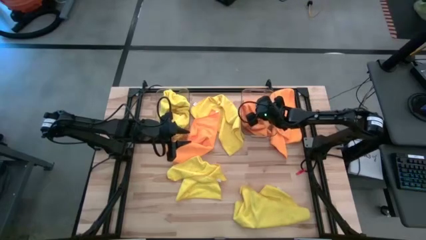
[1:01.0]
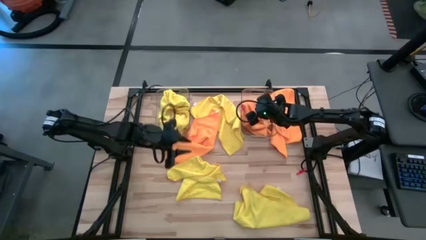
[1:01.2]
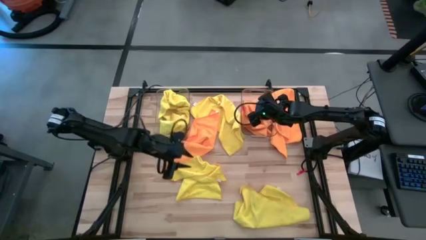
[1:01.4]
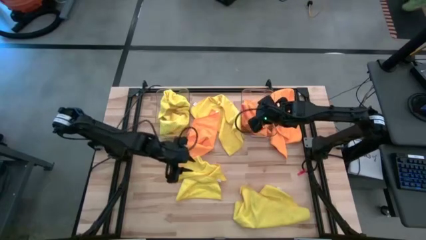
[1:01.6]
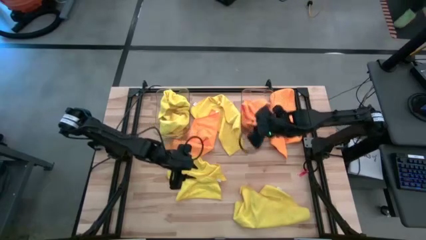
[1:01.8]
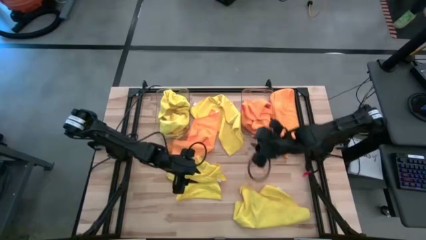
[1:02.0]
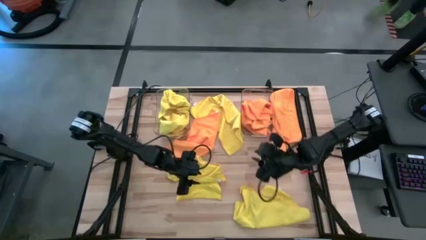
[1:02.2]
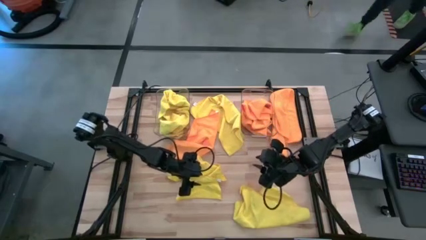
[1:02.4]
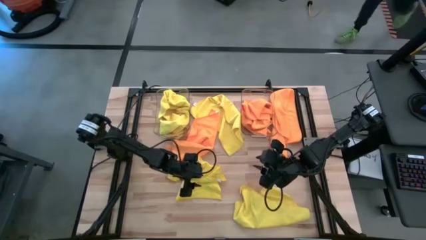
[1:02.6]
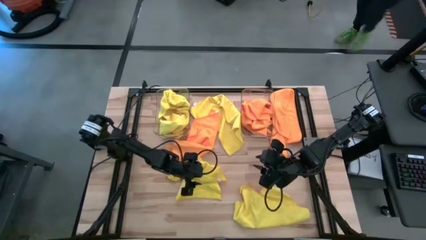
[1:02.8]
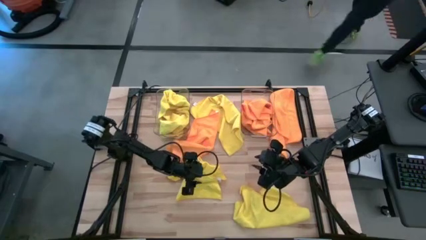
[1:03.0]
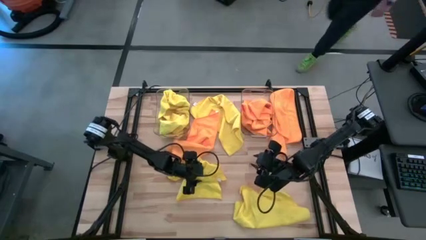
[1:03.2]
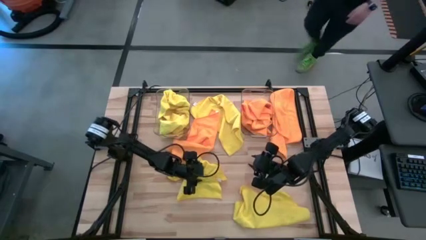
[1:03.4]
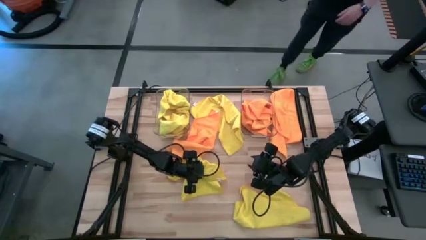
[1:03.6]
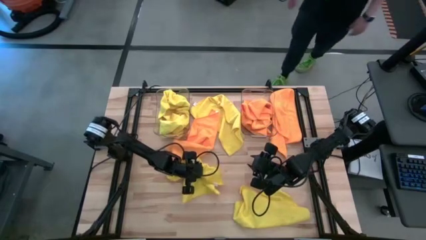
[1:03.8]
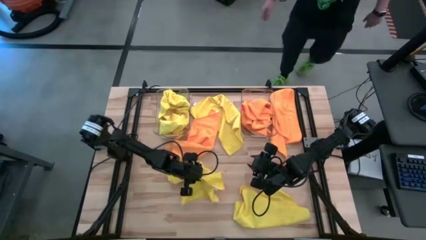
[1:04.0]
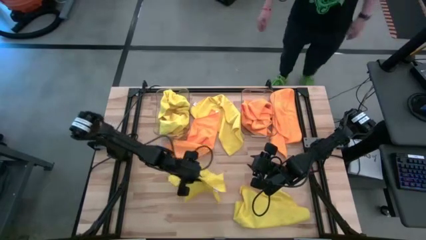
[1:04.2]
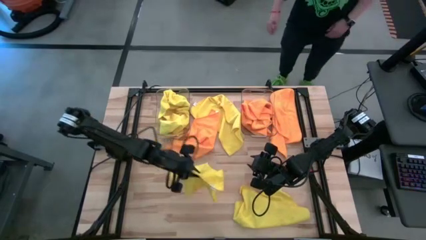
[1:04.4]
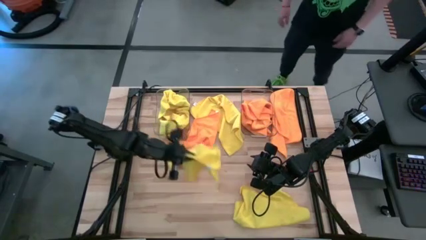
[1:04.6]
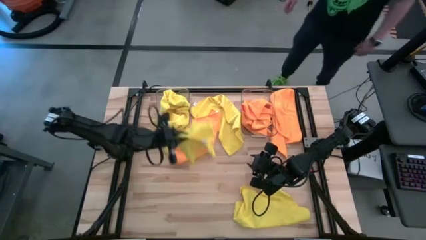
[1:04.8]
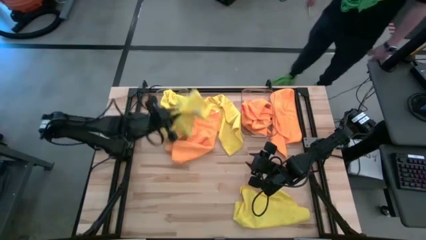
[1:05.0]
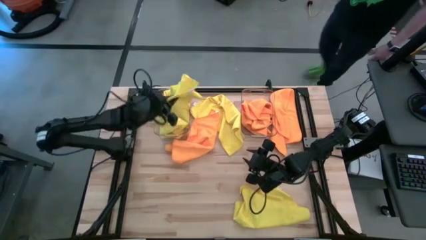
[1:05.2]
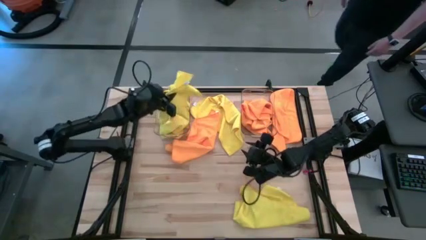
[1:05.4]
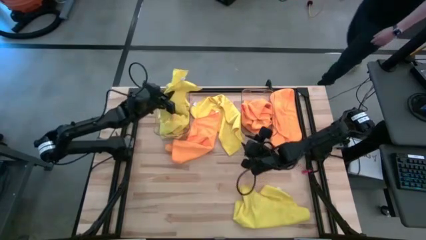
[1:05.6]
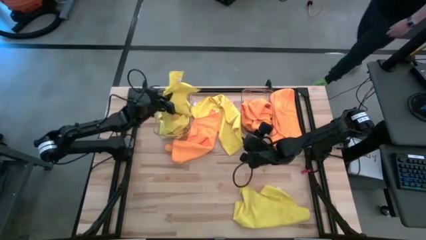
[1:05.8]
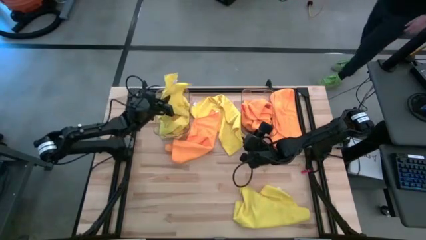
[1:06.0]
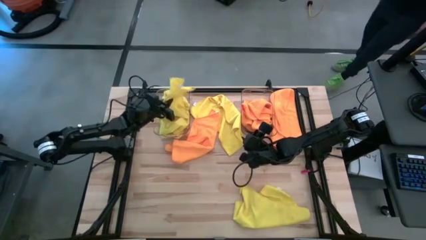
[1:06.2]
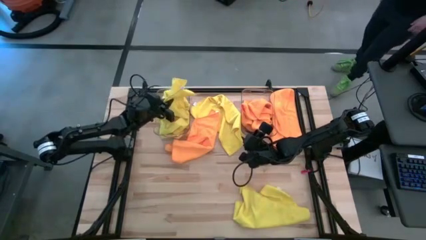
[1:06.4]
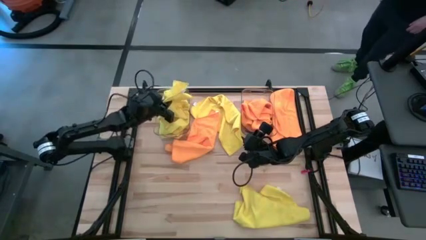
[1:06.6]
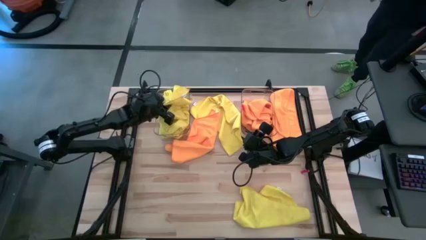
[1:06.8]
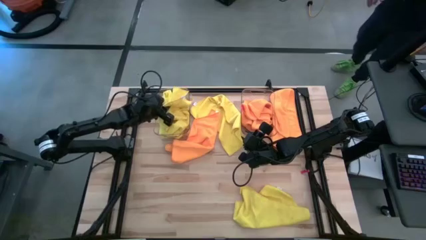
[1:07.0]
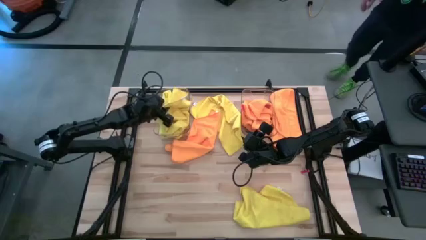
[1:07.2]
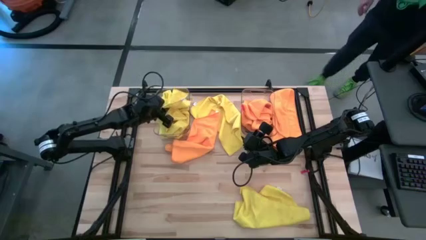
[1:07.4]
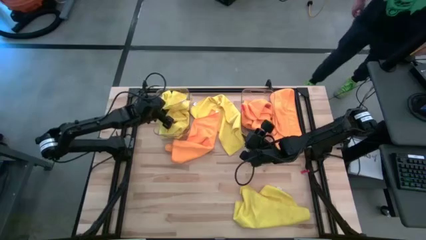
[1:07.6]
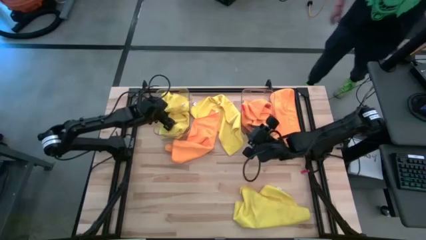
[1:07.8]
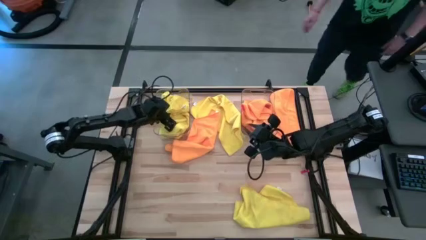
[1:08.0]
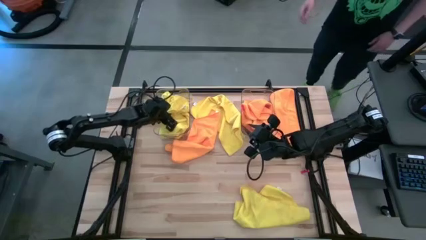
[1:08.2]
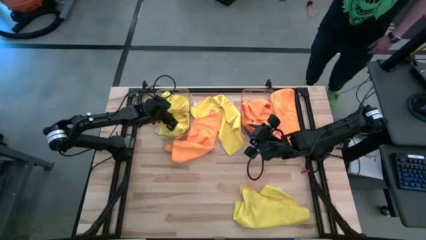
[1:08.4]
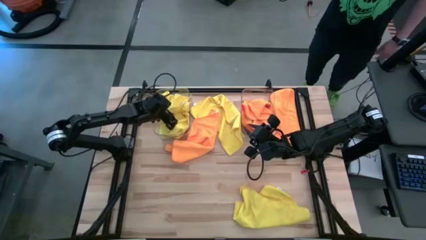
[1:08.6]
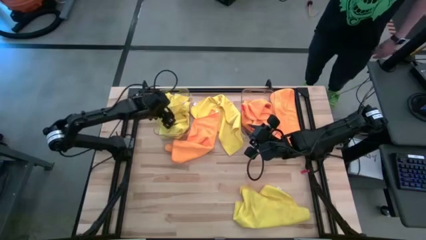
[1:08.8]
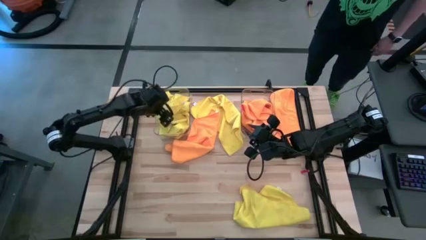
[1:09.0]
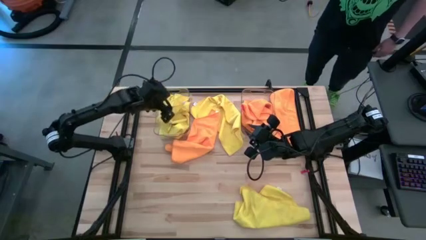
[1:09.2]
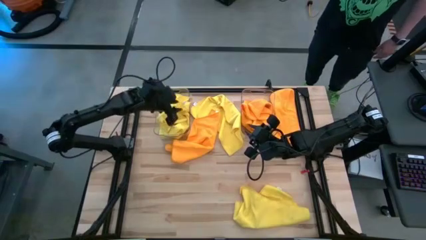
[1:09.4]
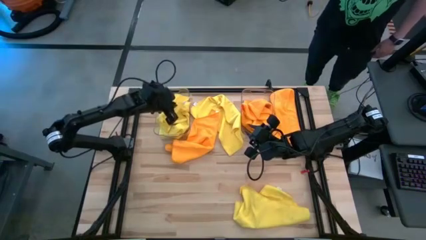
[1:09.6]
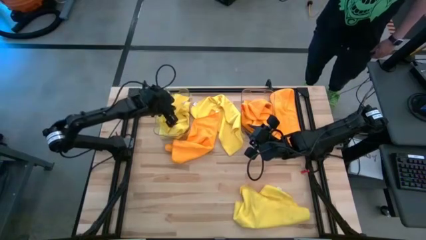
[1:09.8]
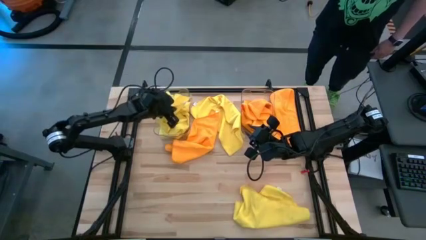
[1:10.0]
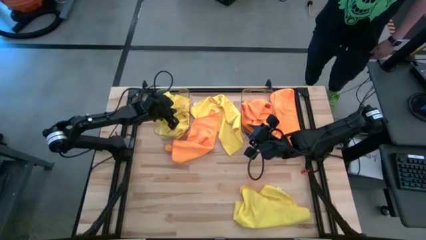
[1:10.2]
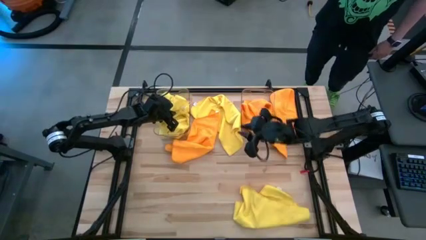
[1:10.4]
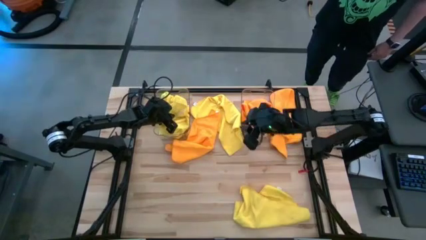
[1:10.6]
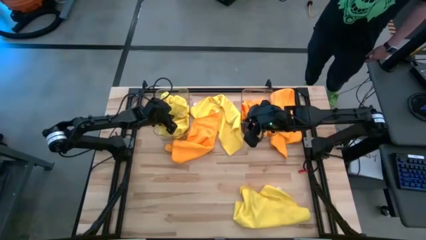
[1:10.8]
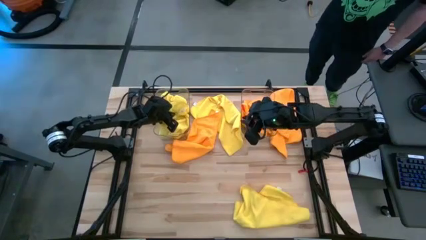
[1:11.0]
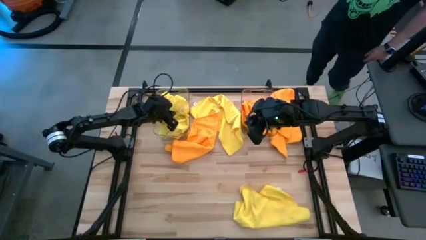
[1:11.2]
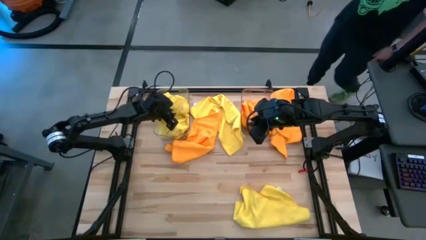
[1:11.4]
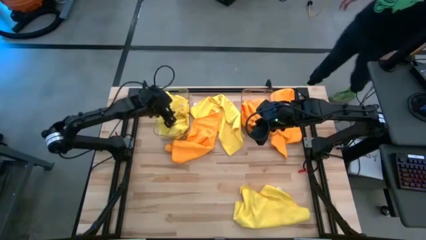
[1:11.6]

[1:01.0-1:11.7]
Task: Sort microfiber towel by color & place in baskets
Put the yellow microfiber cloth into the left transparent bin

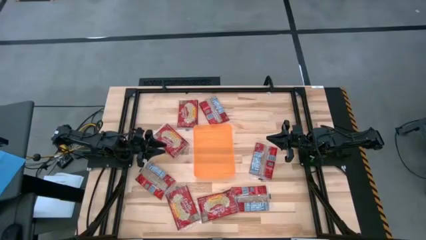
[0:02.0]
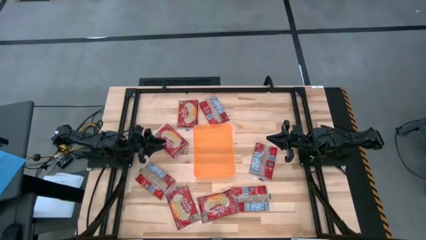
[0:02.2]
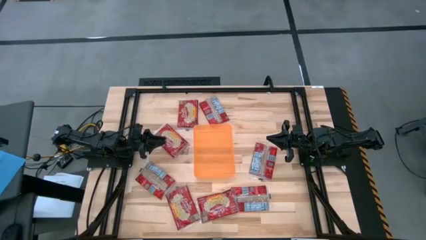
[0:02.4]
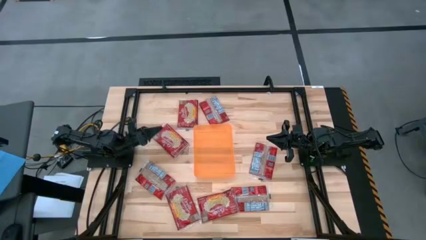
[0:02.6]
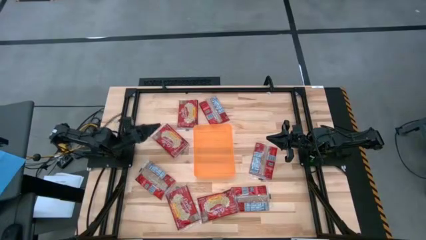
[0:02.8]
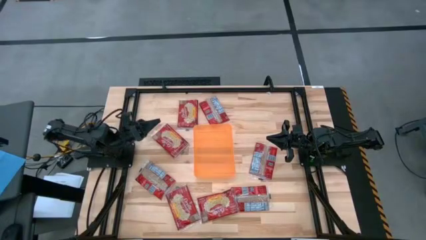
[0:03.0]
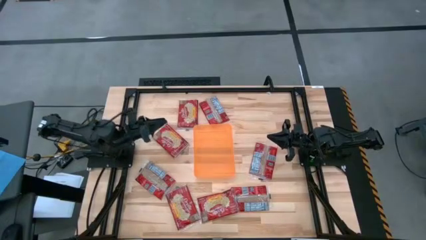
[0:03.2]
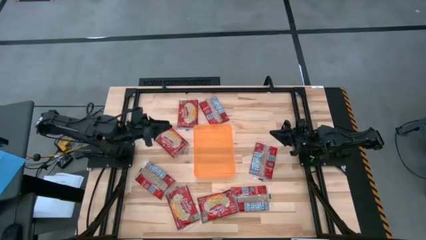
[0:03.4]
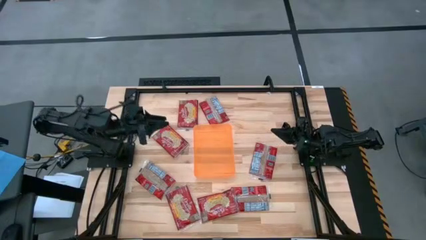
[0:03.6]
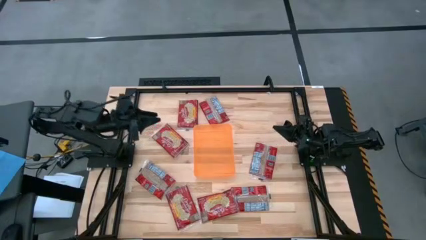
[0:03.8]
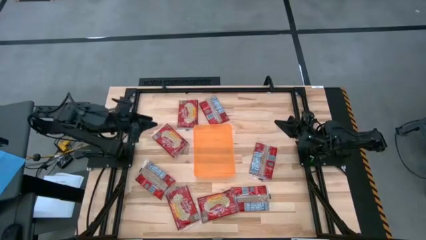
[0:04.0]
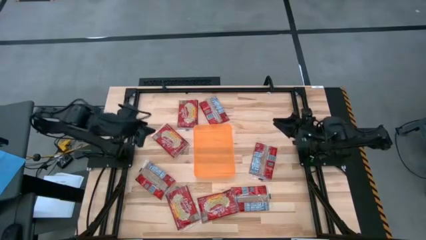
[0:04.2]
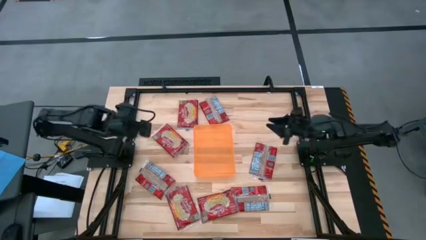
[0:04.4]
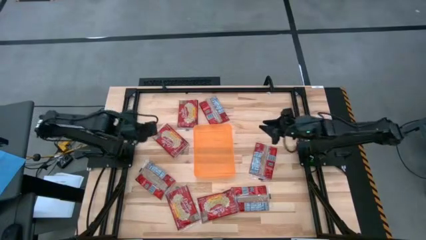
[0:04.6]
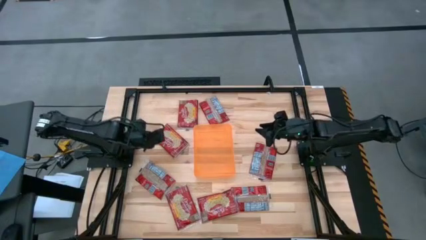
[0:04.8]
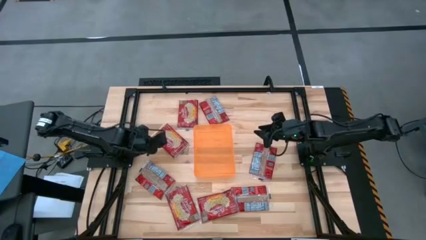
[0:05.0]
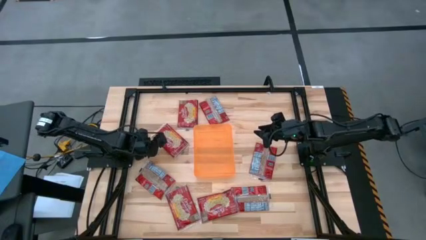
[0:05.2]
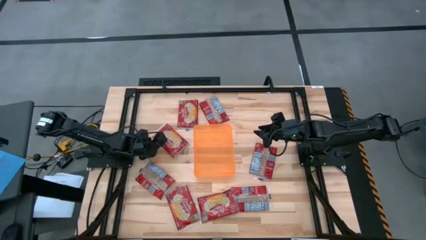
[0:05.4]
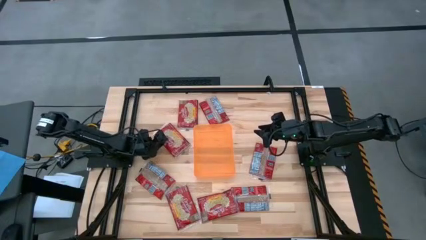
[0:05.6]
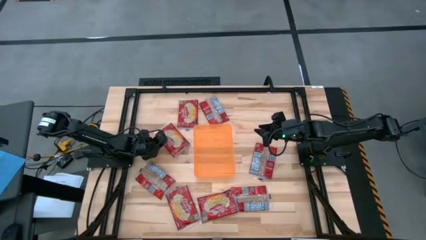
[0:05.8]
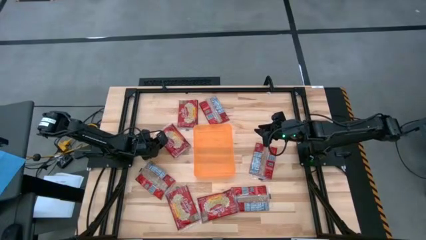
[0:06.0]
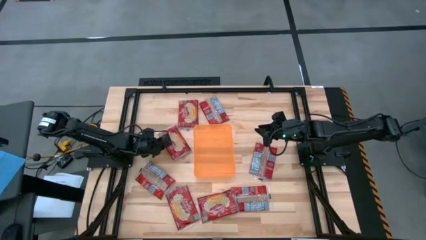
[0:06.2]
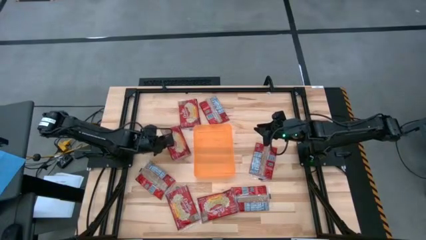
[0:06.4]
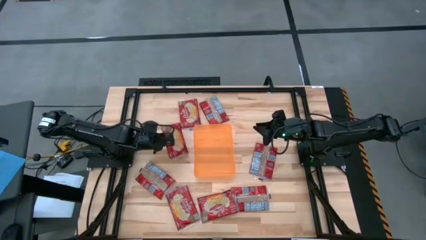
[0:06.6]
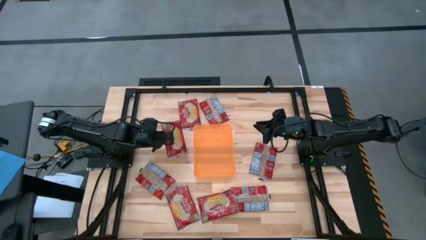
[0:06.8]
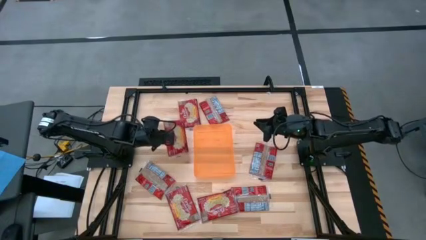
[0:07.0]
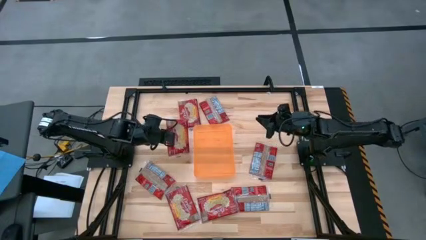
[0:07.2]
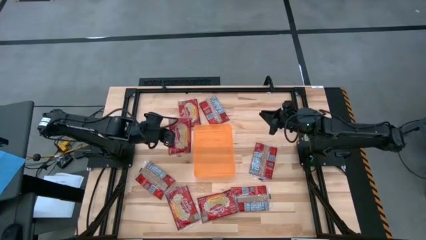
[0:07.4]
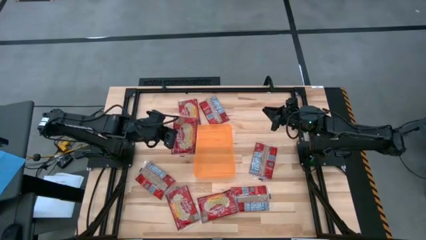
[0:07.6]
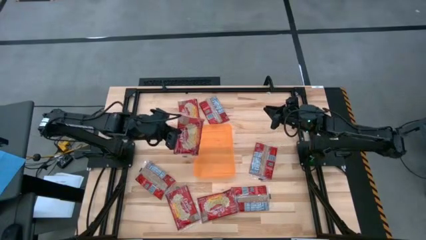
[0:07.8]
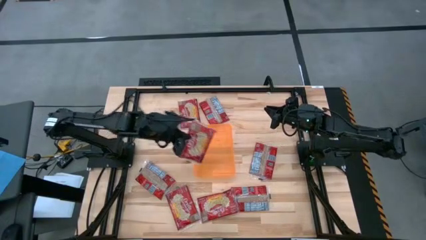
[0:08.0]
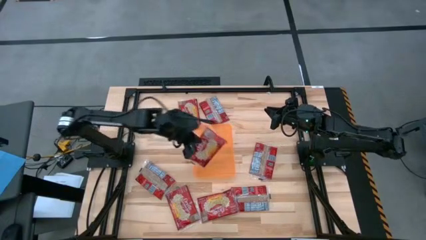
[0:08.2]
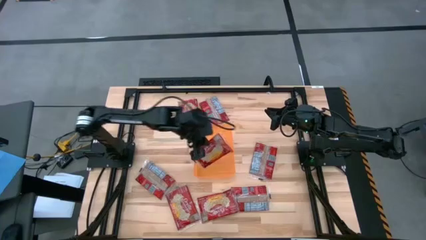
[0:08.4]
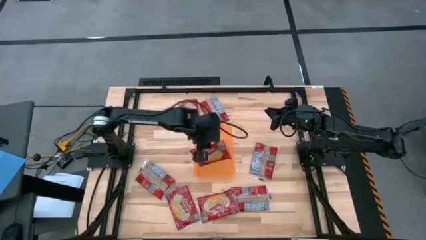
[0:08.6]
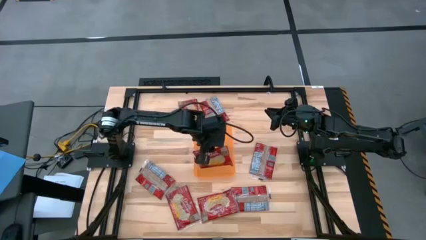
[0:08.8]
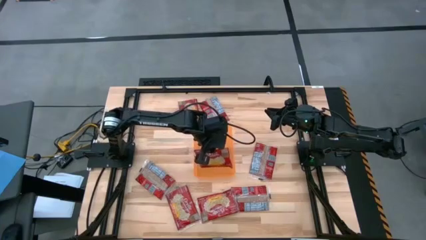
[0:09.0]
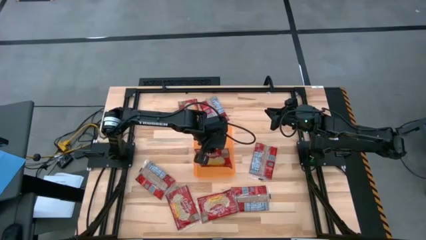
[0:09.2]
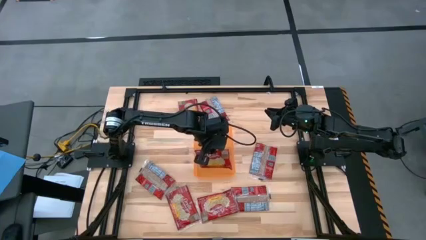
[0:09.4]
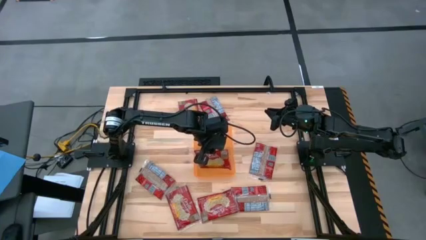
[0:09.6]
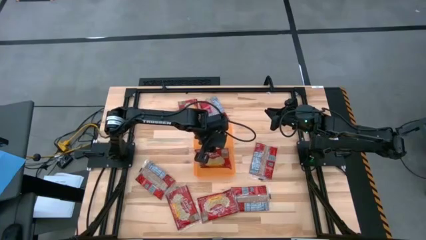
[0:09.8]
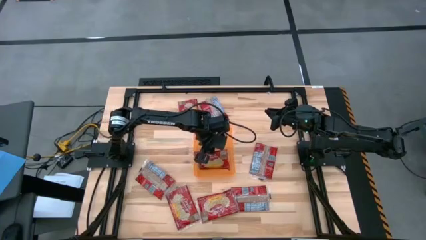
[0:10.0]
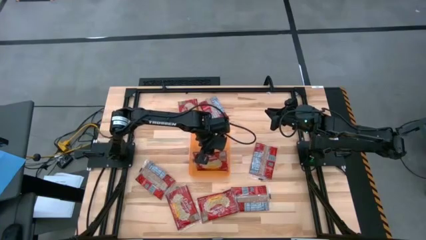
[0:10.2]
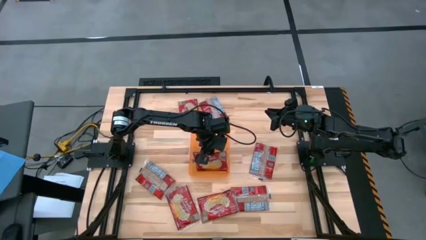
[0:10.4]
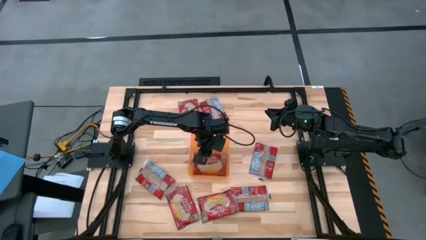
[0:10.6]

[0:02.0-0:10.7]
Task: Sort popcorn bags into baskets
Put the red popcorn bag into the orange bin
